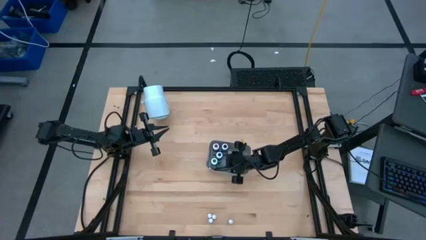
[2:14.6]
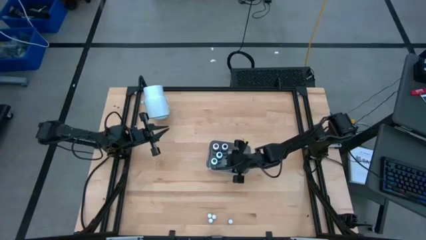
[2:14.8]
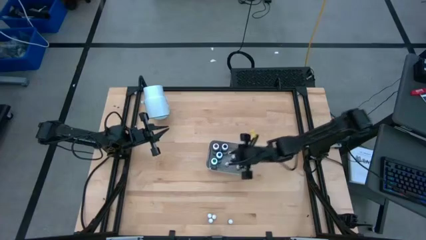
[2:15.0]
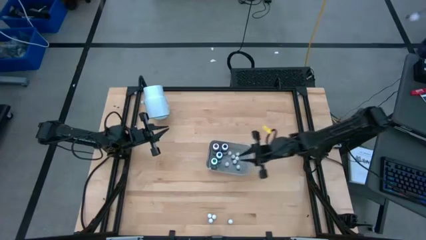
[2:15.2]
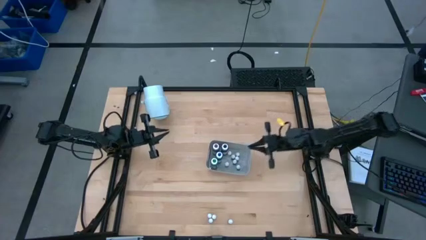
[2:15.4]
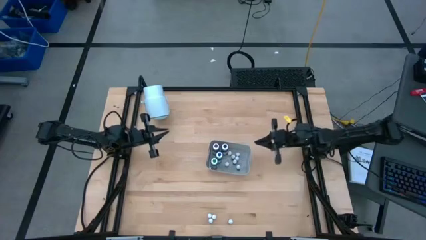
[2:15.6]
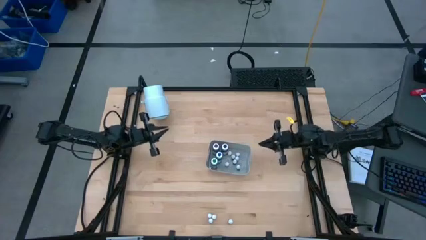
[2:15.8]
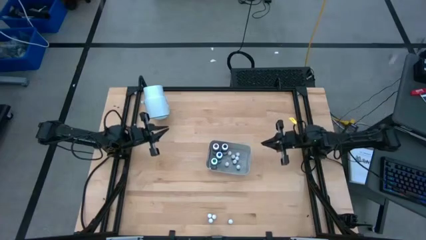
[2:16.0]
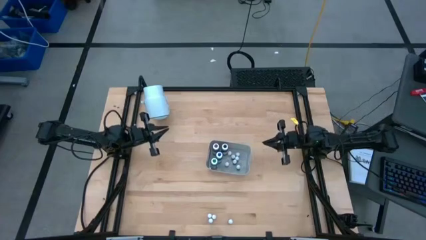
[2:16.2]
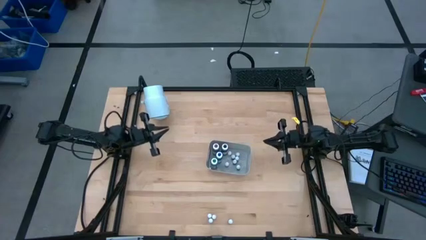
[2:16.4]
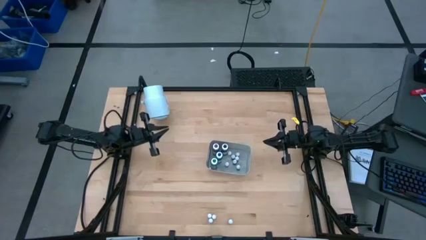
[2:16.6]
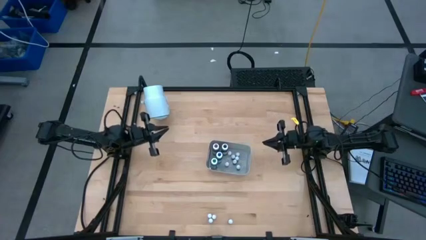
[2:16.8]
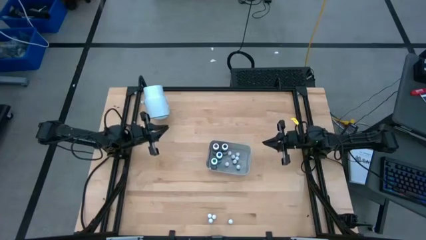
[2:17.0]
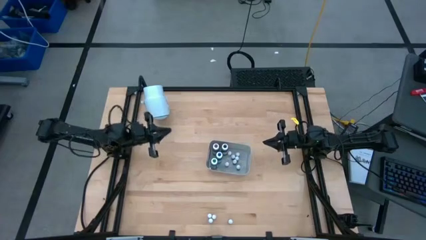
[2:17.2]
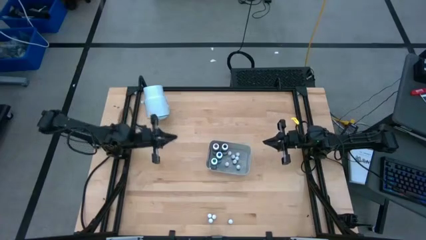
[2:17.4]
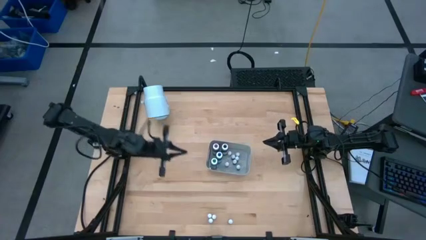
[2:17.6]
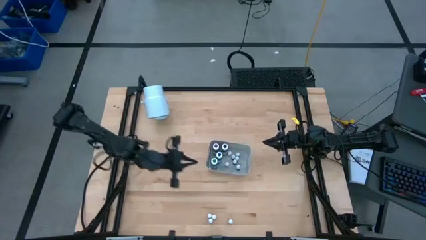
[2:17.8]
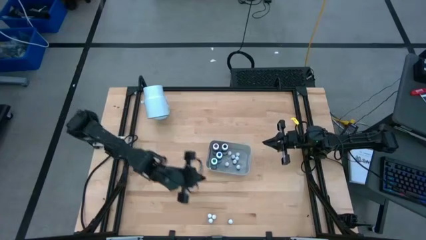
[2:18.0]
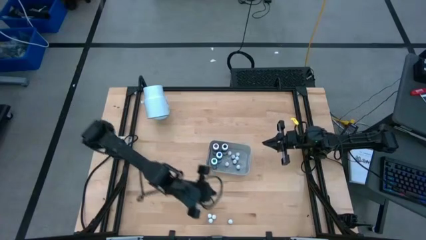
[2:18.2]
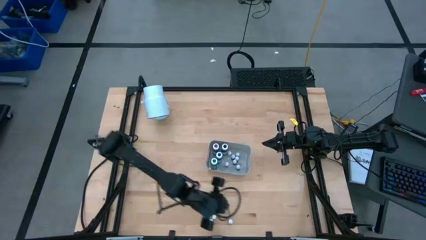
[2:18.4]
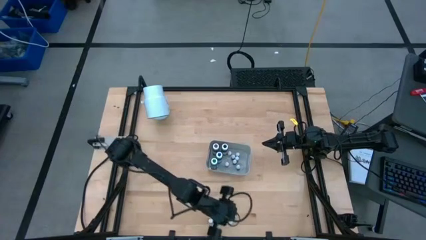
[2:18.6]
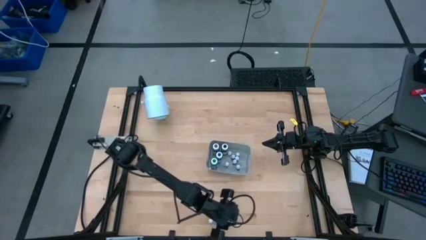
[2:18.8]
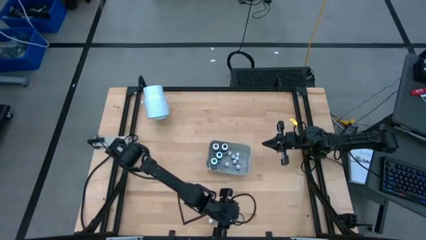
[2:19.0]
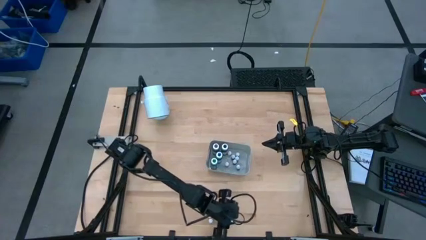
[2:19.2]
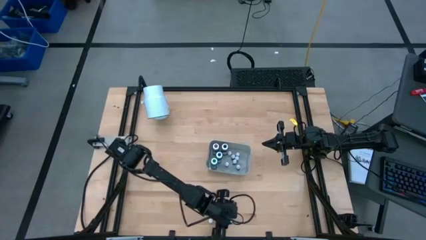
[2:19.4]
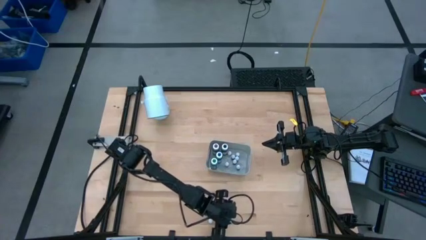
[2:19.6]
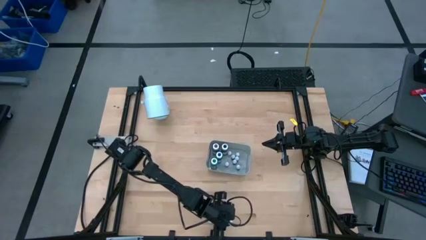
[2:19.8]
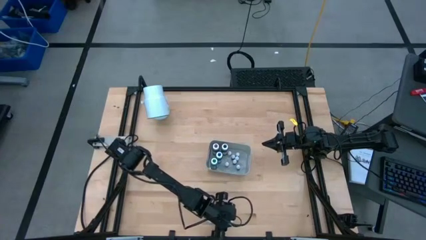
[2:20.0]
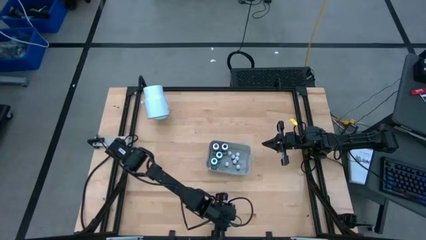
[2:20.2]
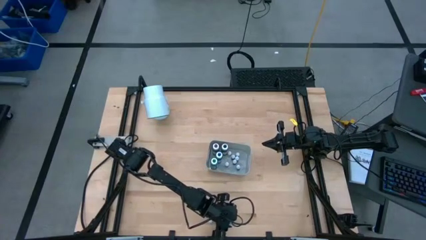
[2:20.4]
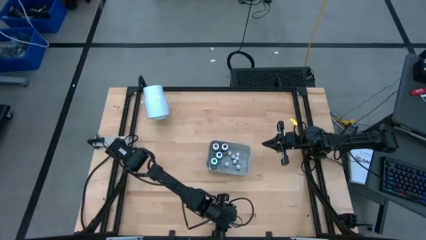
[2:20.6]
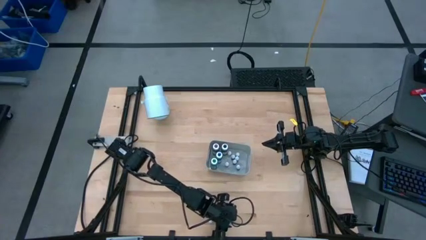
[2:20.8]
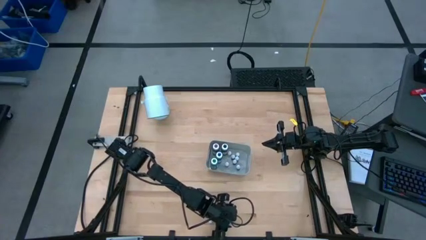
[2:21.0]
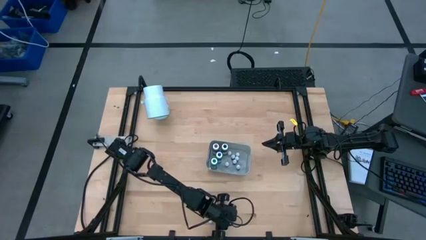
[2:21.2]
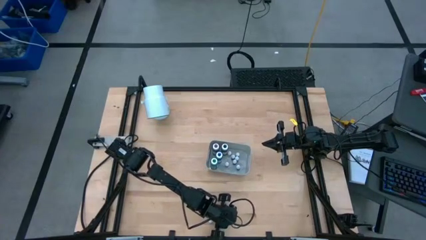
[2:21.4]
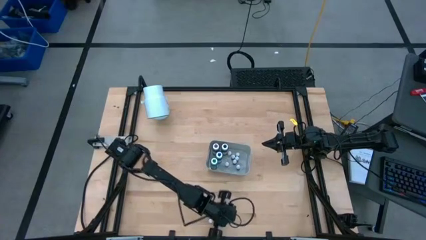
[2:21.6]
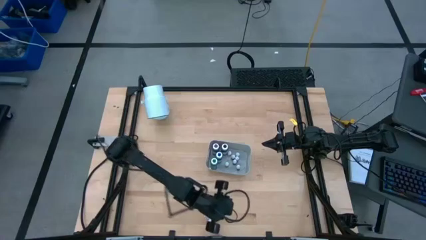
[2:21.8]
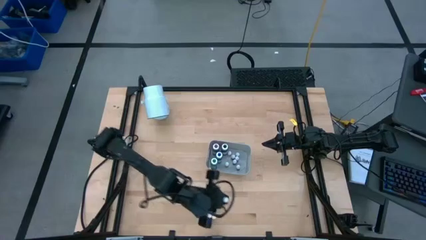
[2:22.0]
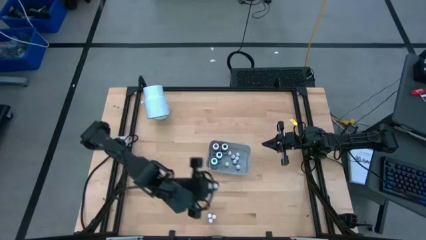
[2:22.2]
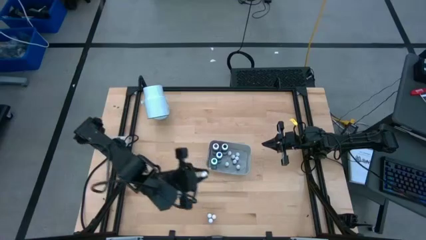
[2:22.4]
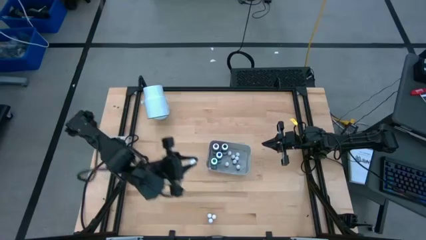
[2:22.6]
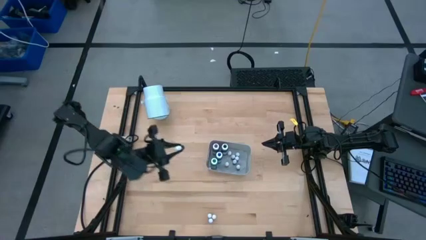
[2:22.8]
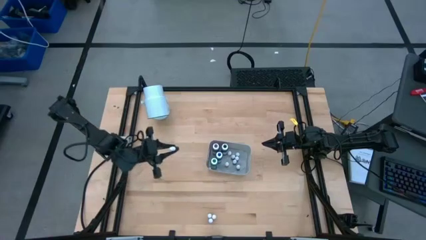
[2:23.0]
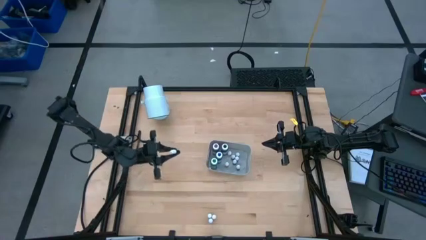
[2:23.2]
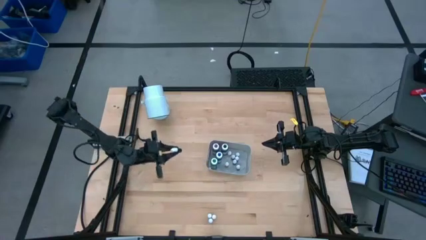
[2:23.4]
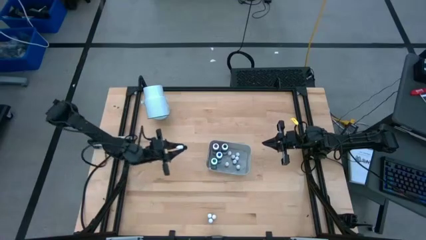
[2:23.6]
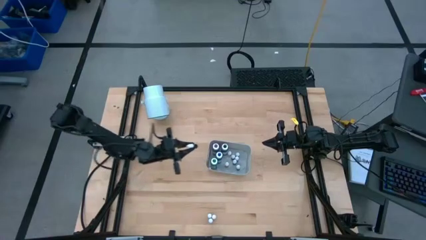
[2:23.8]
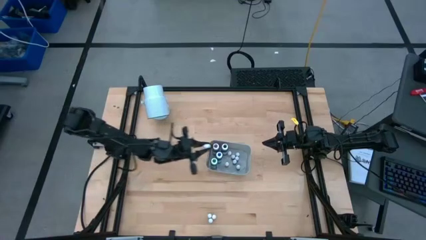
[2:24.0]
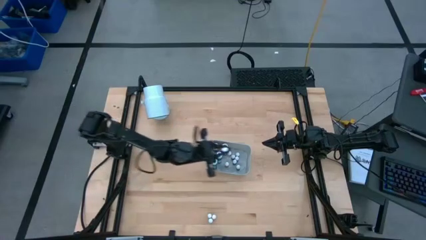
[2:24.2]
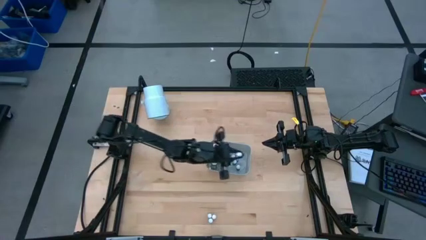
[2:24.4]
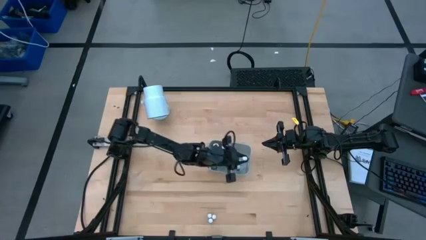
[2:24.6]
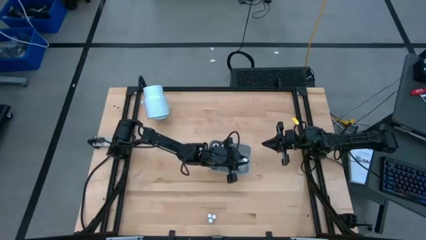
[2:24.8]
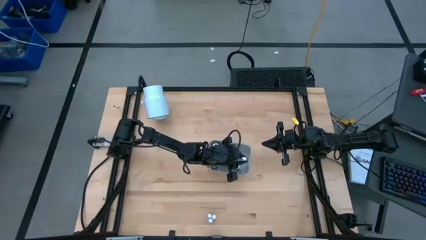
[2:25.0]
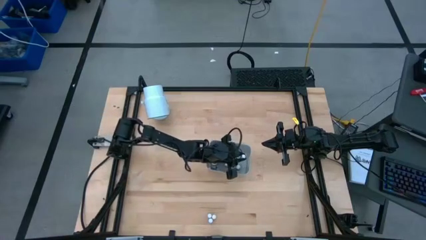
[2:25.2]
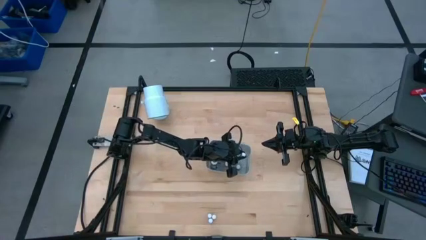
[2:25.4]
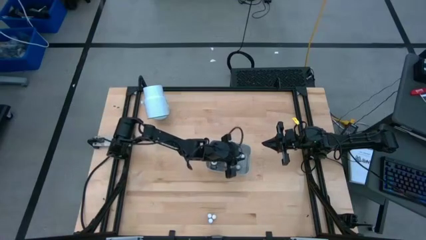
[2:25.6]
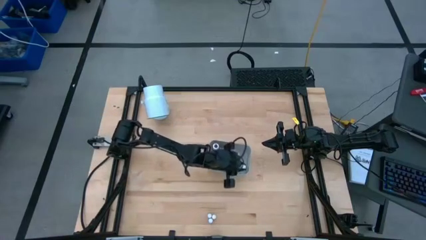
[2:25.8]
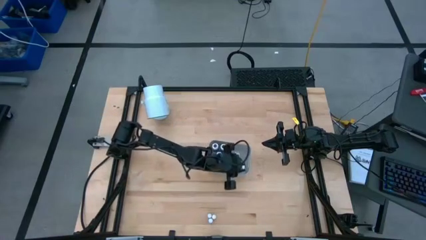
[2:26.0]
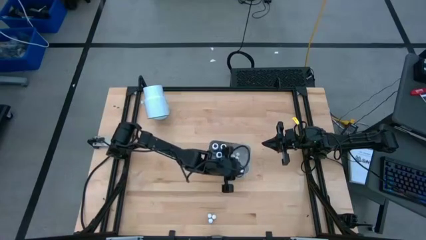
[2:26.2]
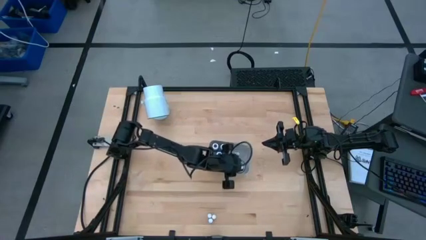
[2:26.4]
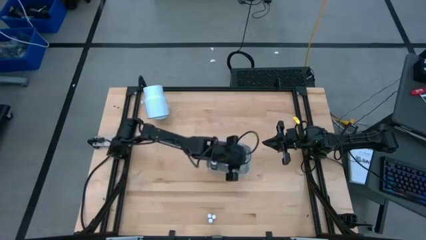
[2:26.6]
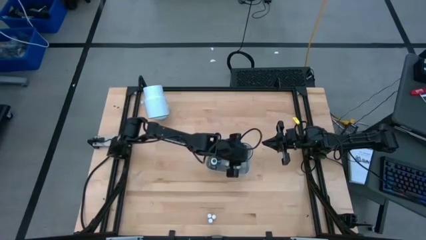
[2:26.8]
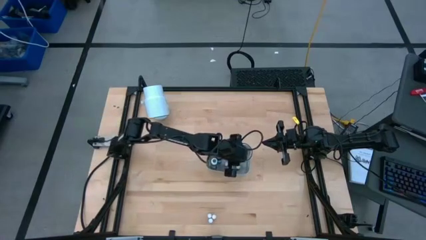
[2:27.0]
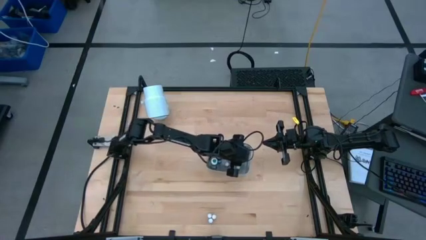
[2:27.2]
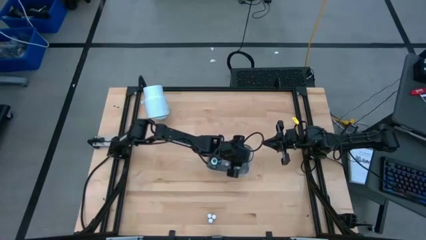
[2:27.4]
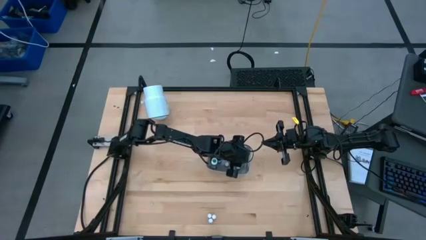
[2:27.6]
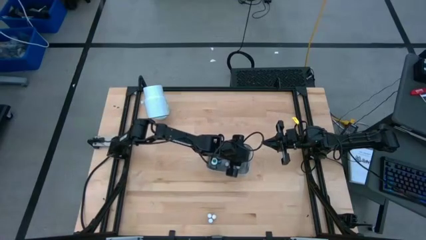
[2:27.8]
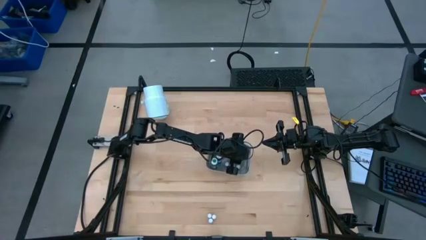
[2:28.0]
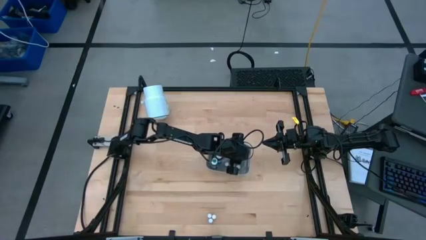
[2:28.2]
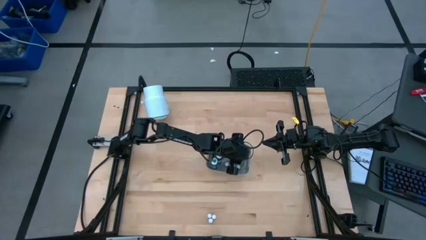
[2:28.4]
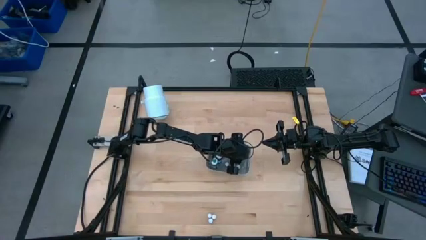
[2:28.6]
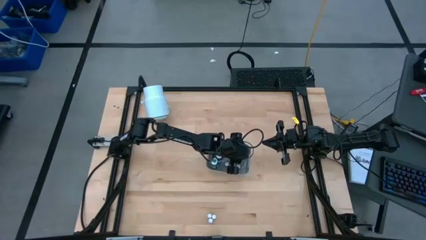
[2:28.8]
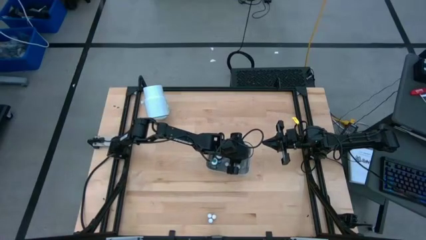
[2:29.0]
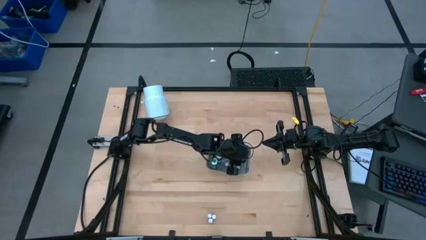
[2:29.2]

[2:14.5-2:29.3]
Task: Pick & Place food coloring
Put the small purple food coloring bottle into the bin

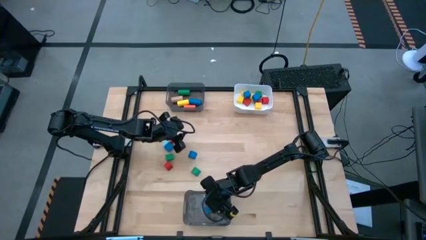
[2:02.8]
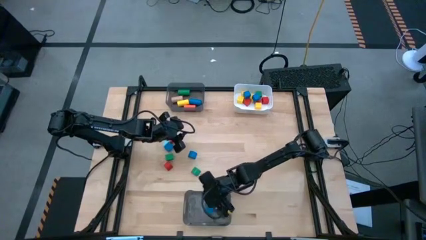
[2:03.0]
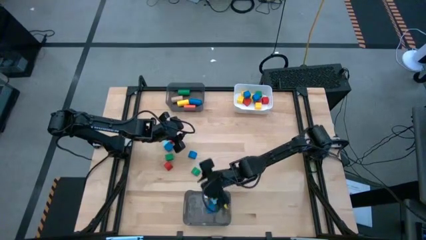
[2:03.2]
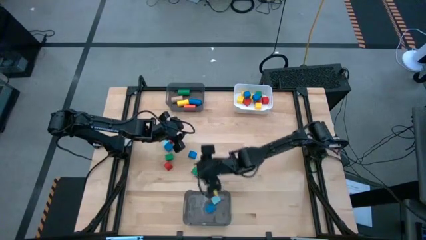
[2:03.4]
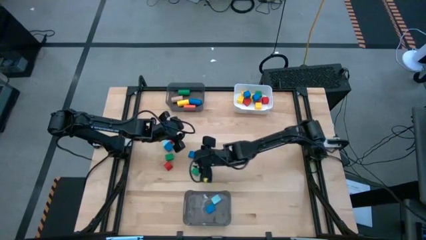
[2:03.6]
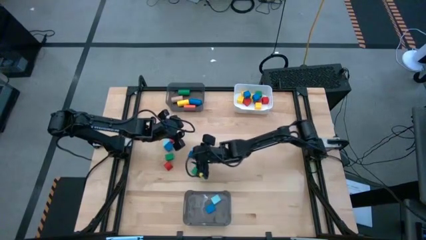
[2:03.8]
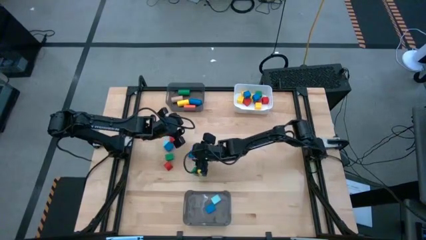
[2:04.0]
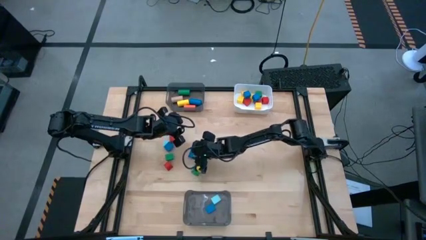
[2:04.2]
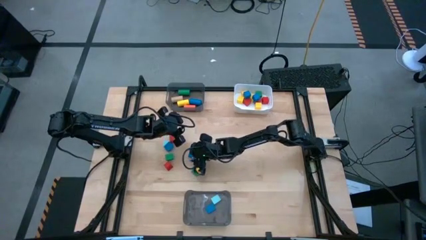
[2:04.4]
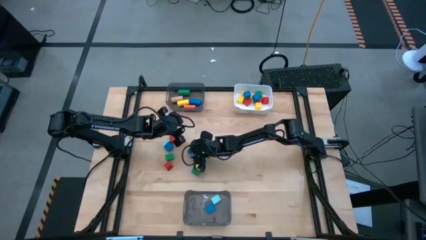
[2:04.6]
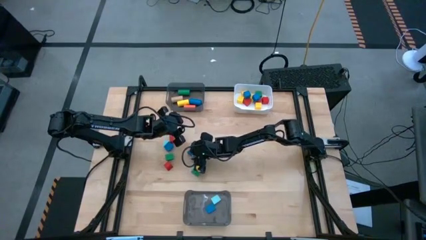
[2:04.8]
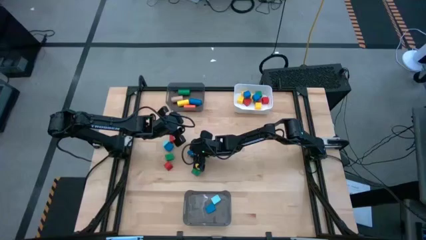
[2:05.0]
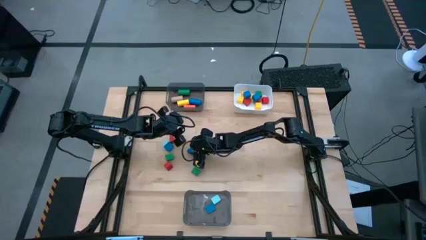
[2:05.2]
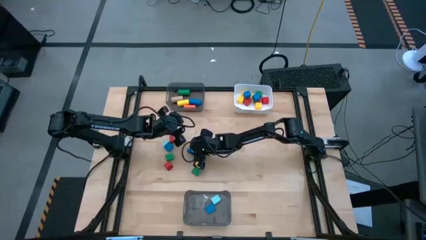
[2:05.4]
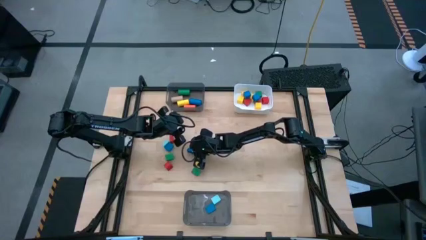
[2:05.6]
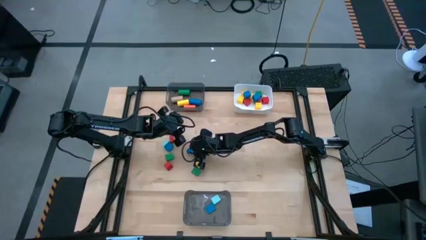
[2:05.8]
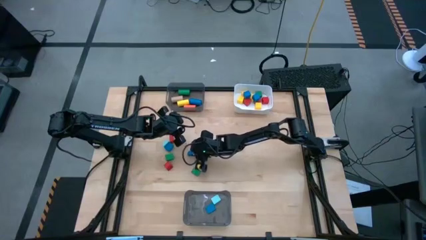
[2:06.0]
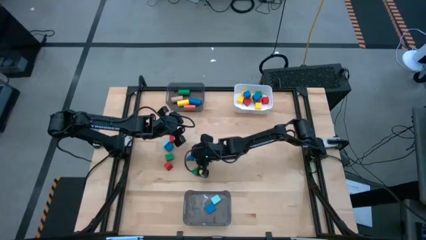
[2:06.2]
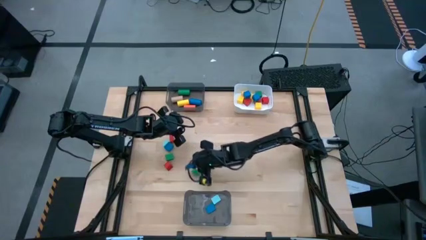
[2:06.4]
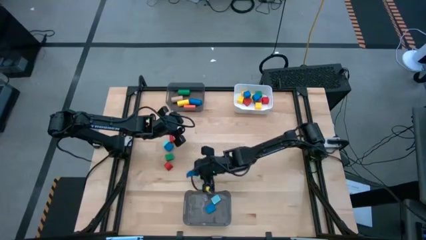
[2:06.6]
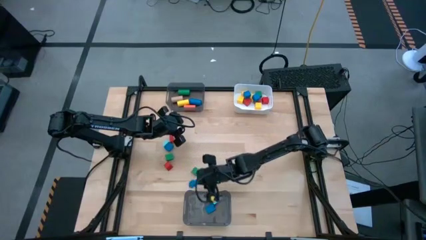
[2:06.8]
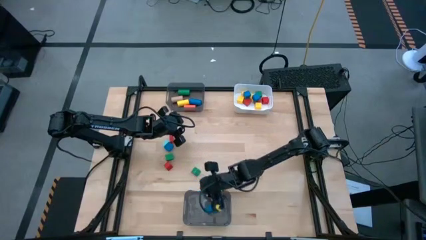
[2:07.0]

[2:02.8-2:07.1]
Task: Sort blocks by size
Put the blue half circle block into the bottom black bin
